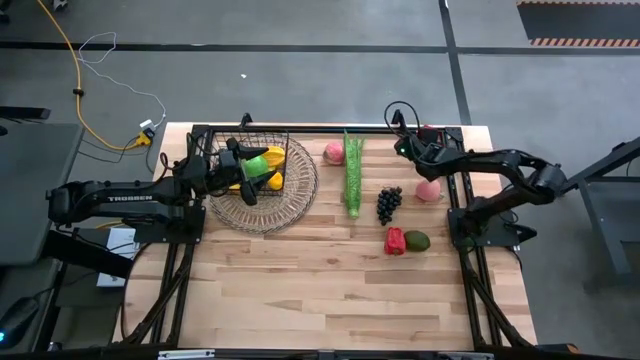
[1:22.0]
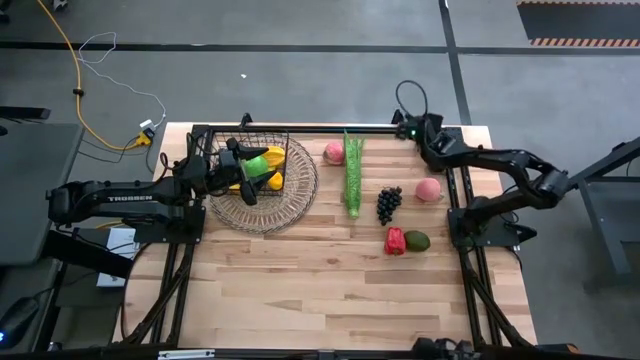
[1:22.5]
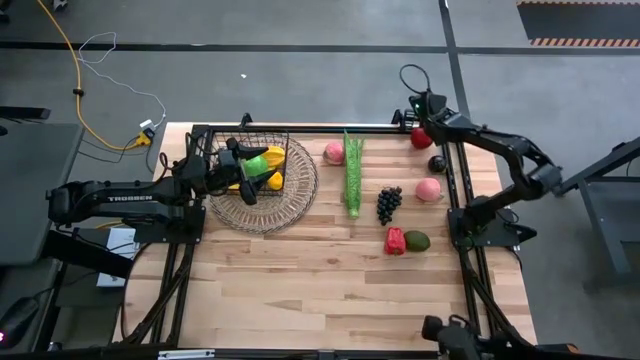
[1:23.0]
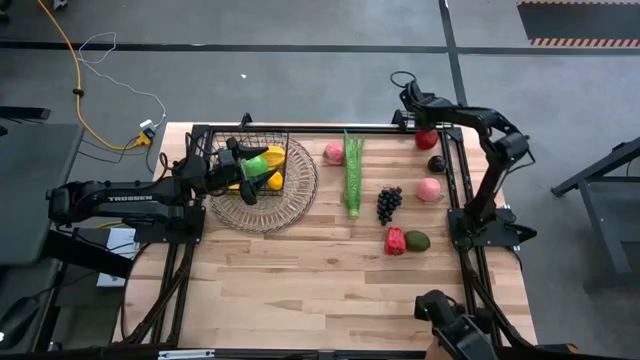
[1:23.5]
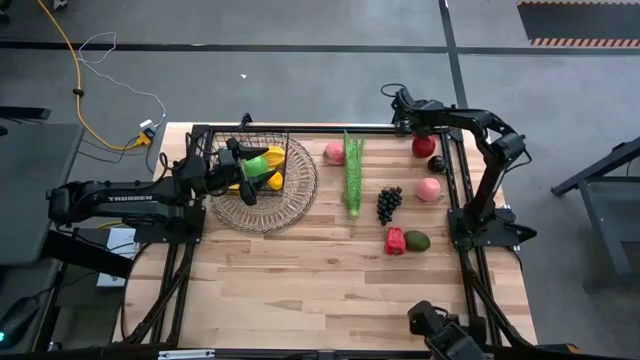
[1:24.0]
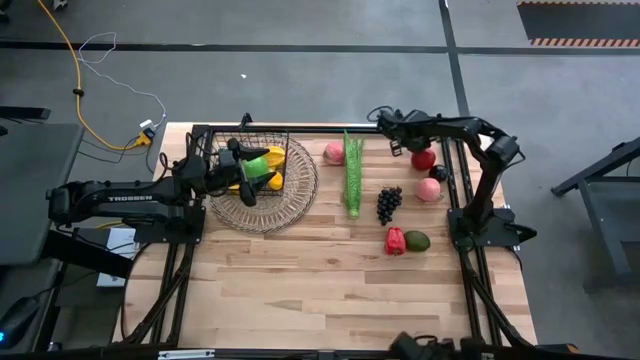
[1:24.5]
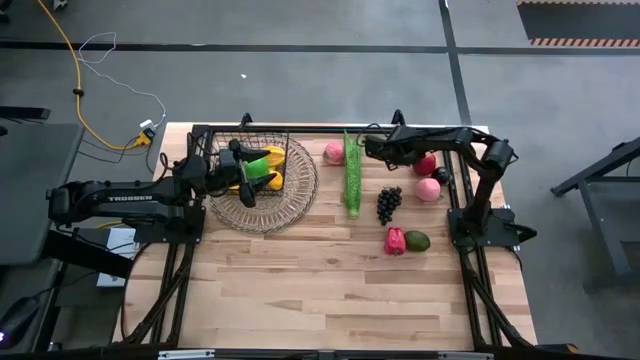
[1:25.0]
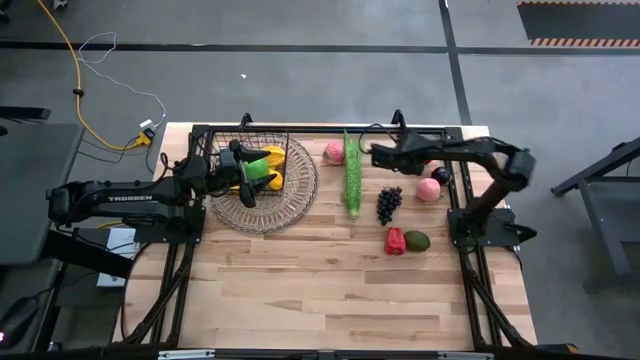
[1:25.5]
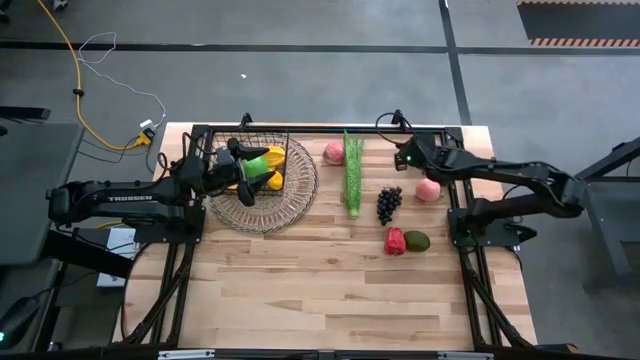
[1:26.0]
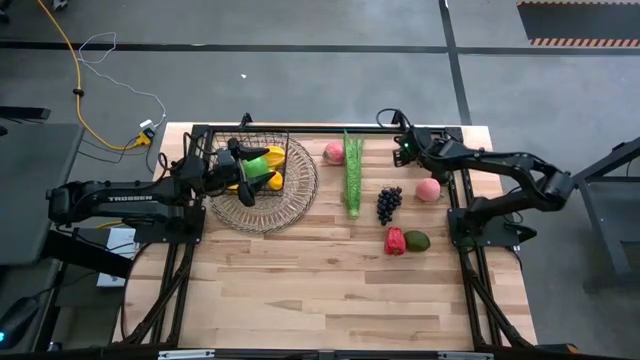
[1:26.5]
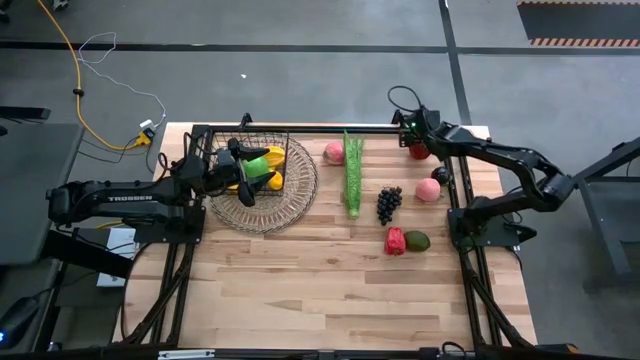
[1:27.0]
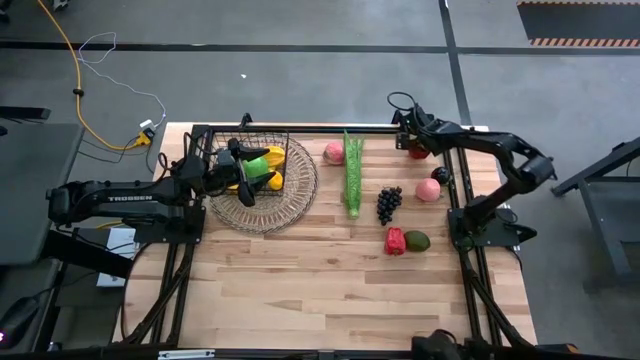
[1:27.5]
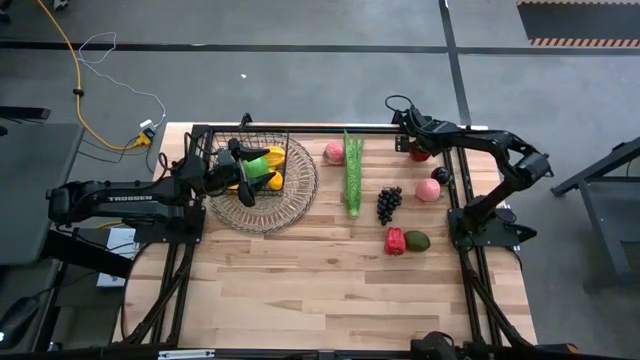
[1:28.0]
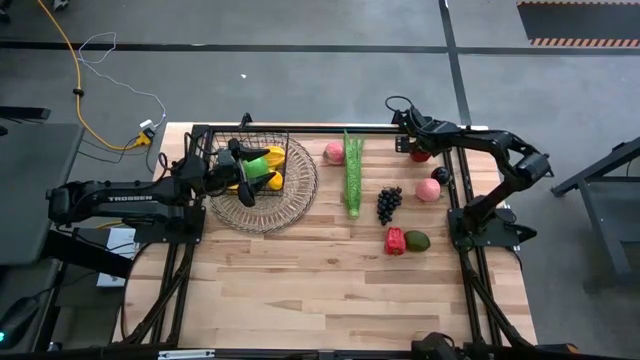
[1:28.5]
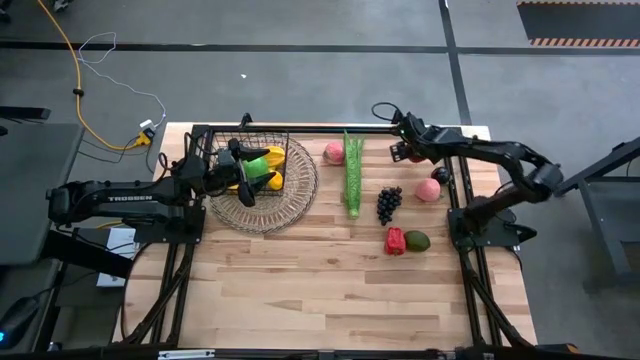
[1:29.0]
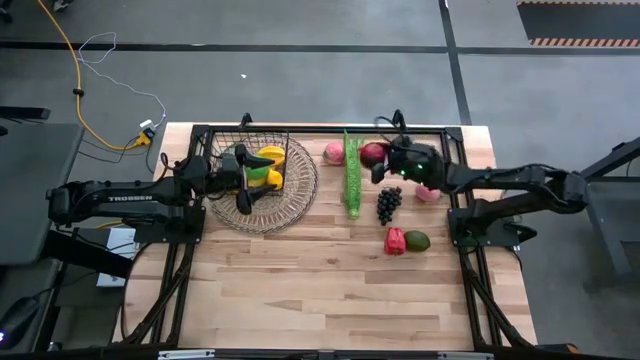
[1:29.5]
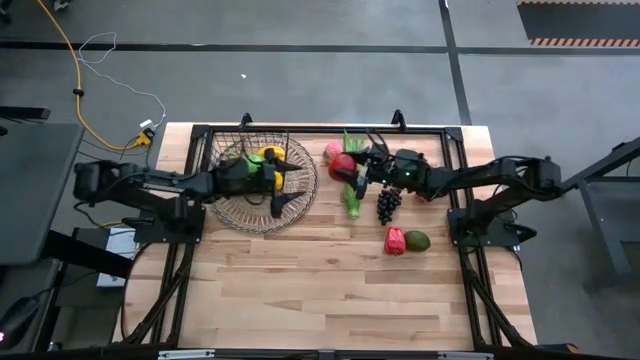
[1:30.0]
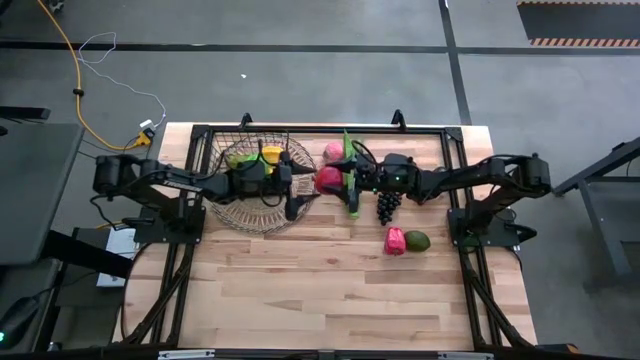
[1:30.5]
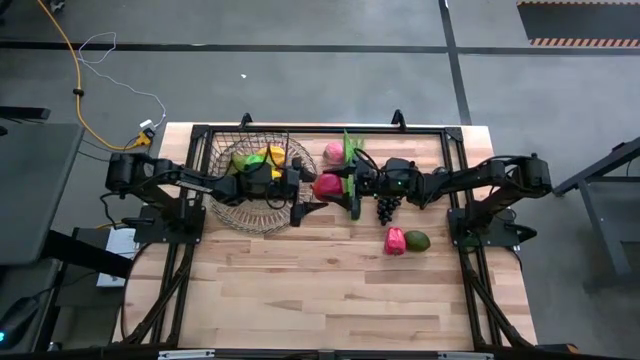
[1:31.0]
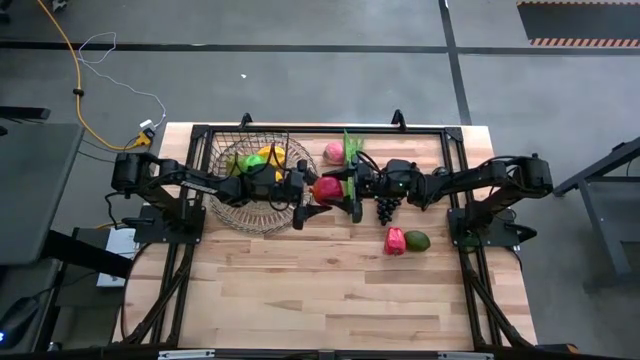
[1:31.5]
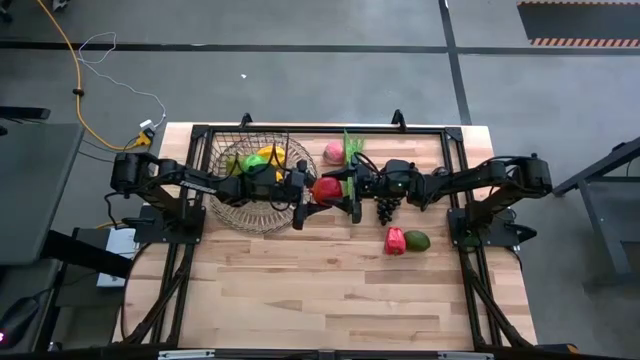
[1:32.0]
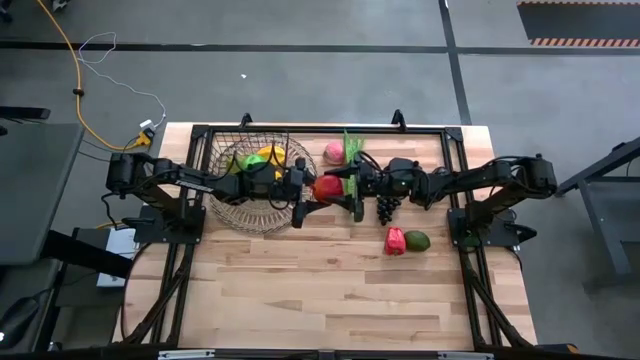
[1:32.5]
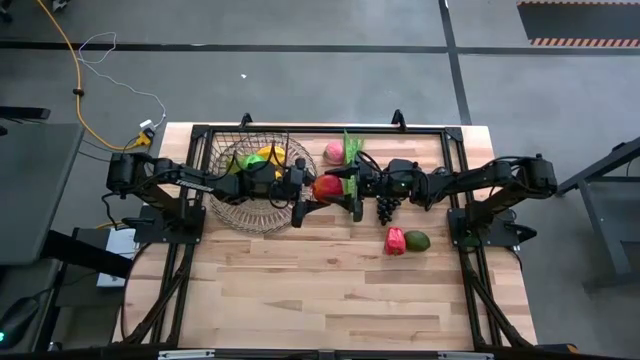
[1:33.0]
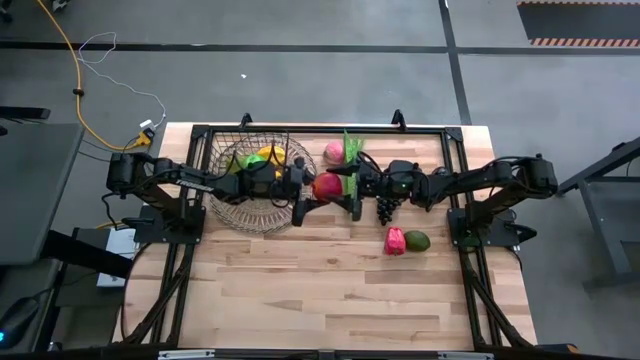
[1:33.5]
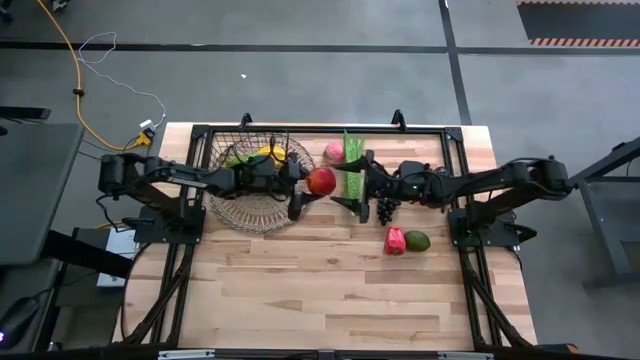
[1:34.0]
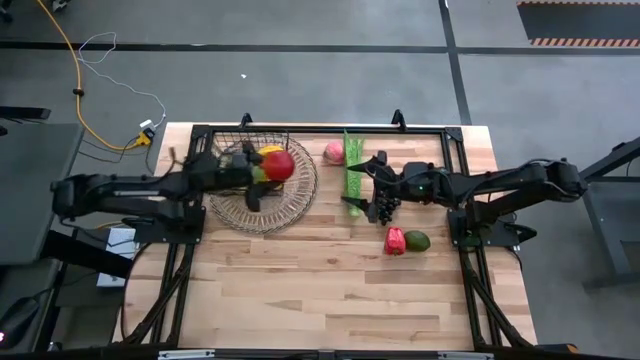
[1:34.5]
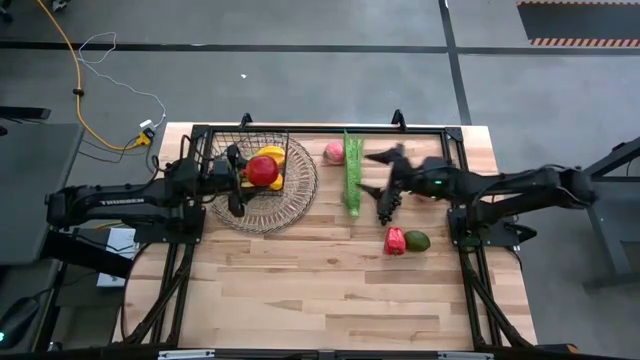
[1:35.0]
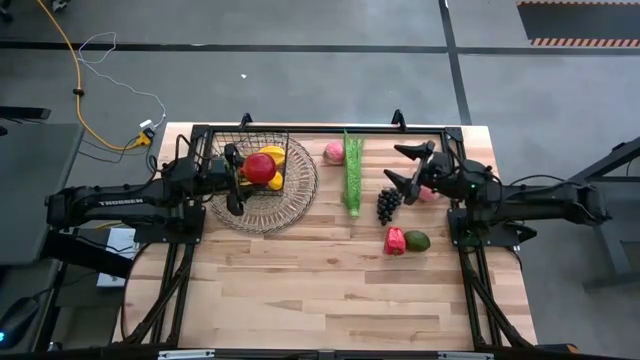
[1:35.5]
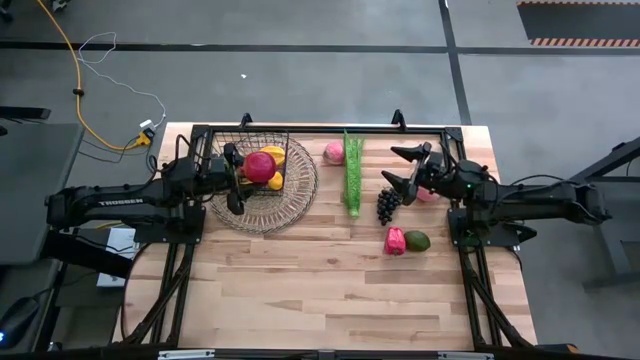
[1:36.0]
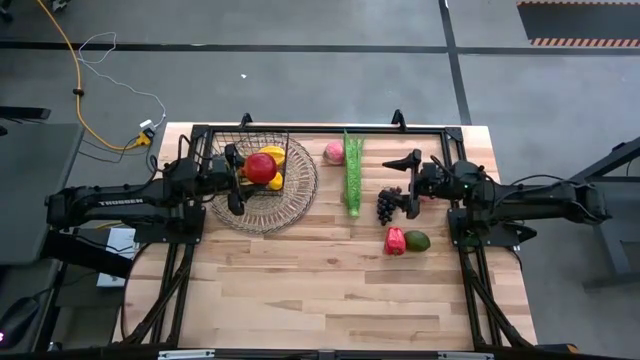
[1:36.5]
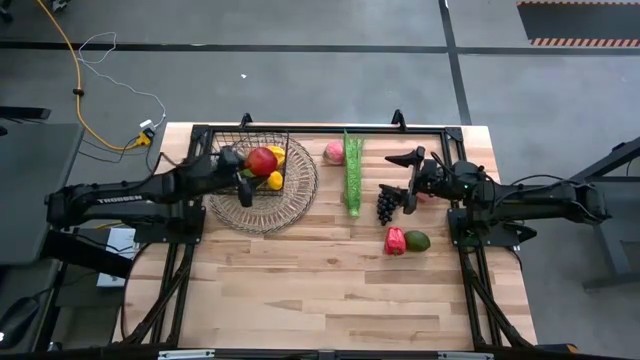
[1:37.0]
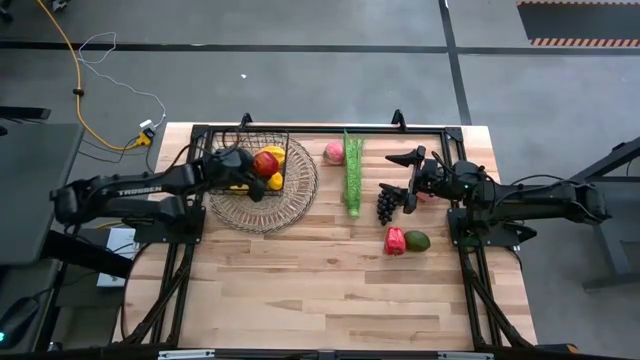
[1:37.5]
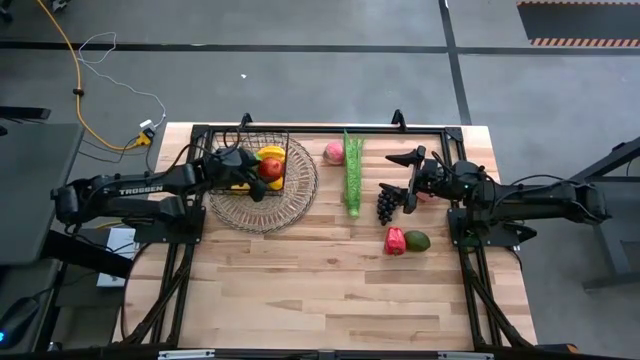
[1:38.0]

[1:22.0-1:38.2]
Task: Build produce basket
Put the red pomegranate into the black wire basket

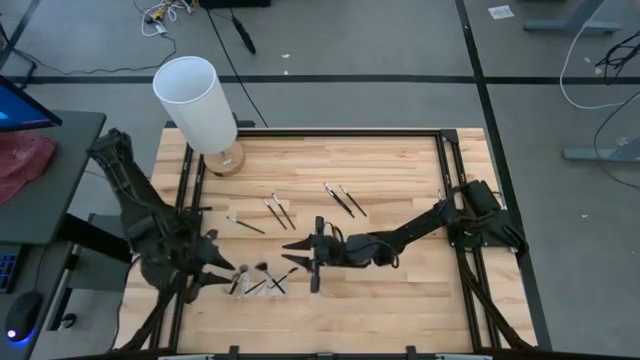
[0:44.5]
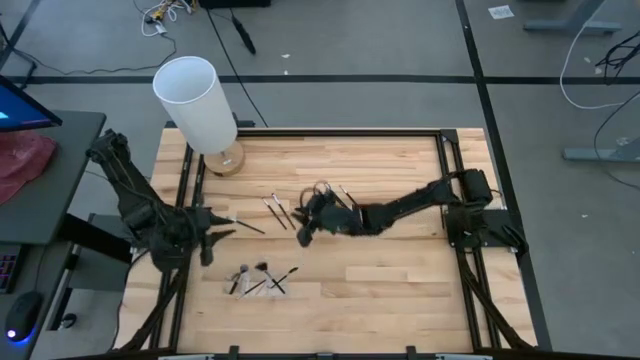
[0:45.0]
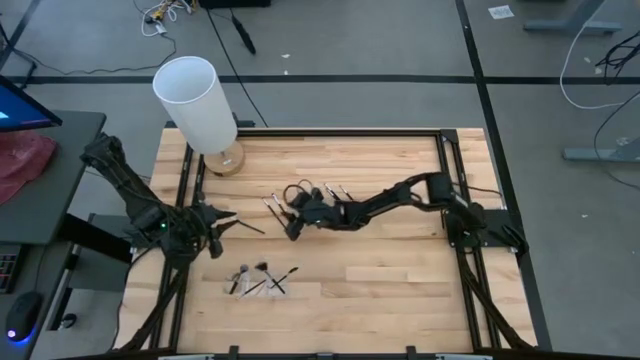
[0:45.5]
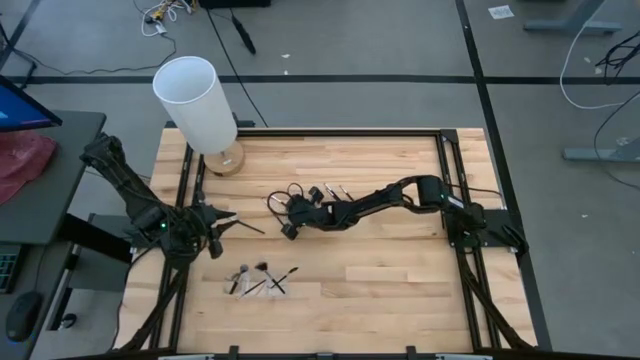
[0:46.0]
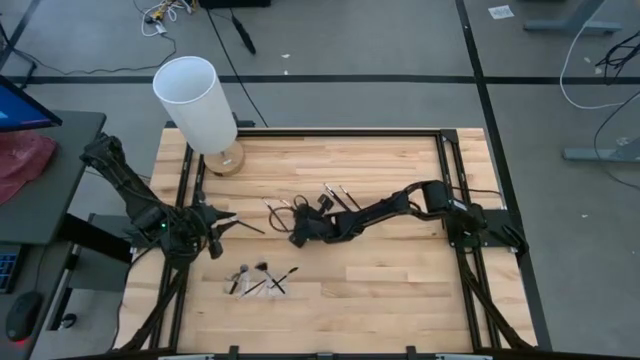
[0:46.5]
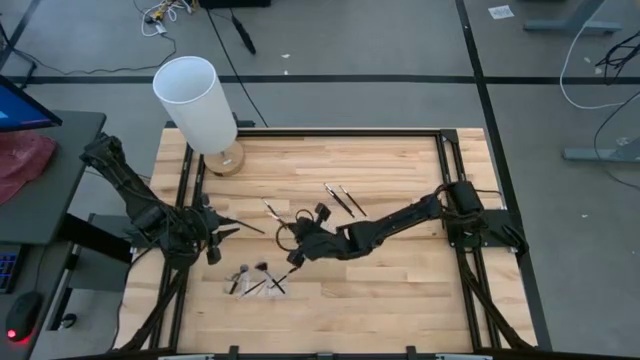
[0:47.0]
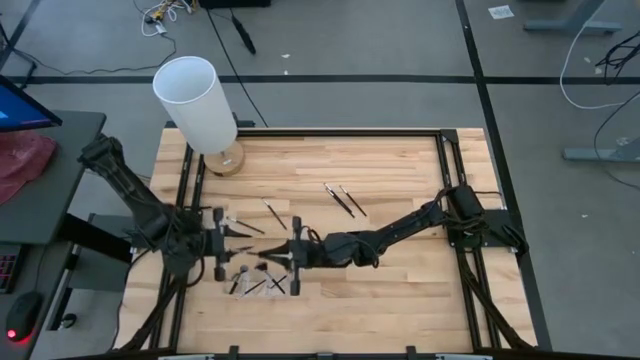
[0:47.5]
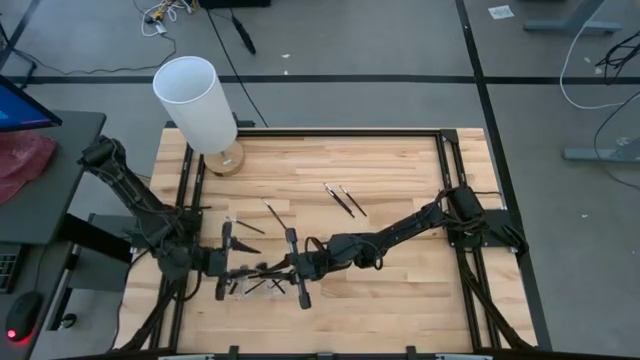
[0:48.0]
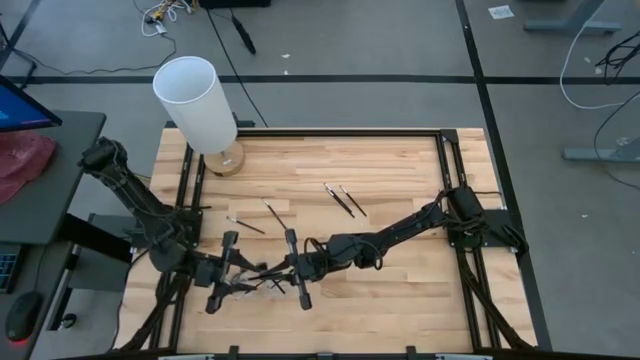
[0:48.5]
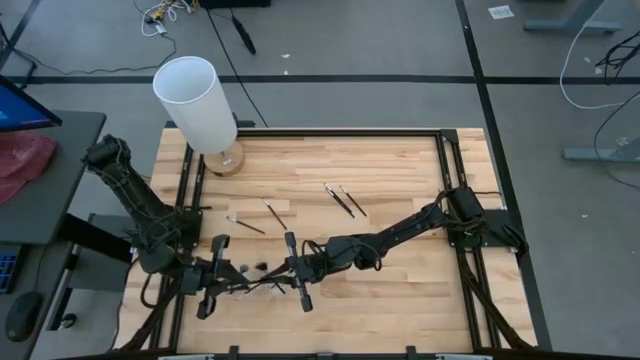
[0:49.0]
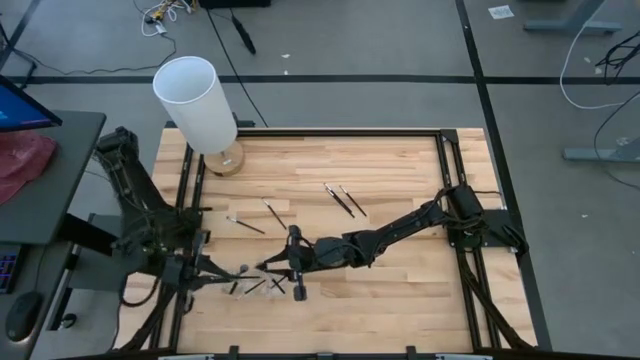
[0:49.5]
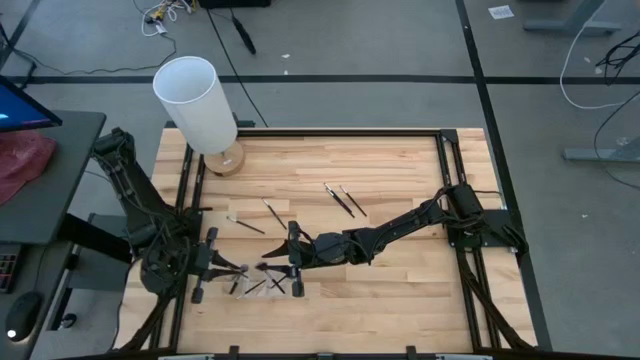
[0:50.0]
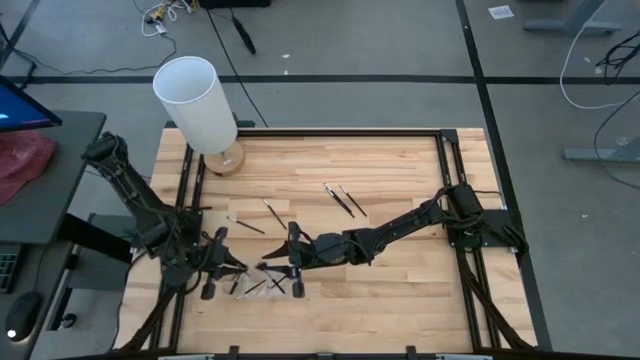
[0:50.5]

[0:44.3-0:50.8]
Task: Put items in baskets/containers
Put the eyeshadow brush into the transparent organizer
